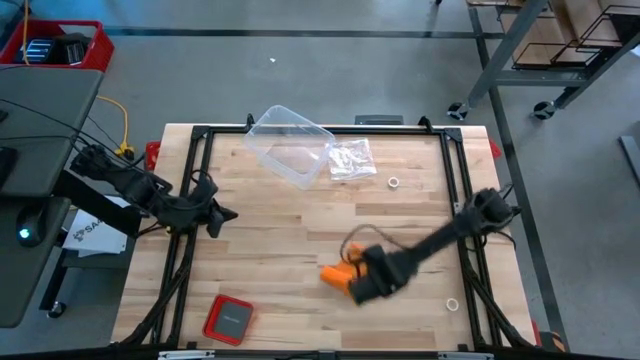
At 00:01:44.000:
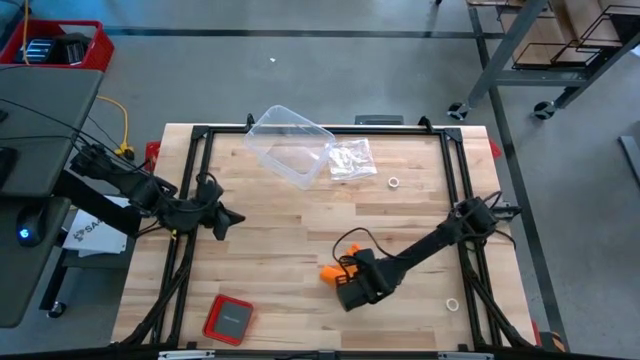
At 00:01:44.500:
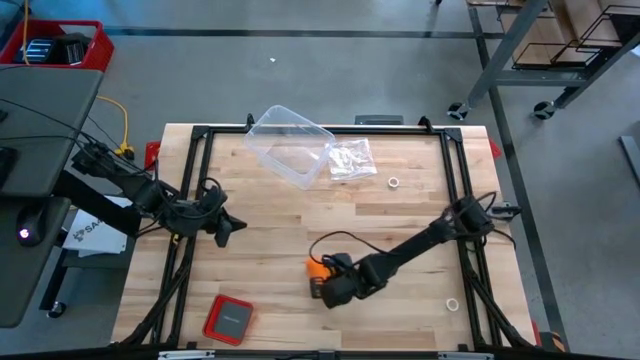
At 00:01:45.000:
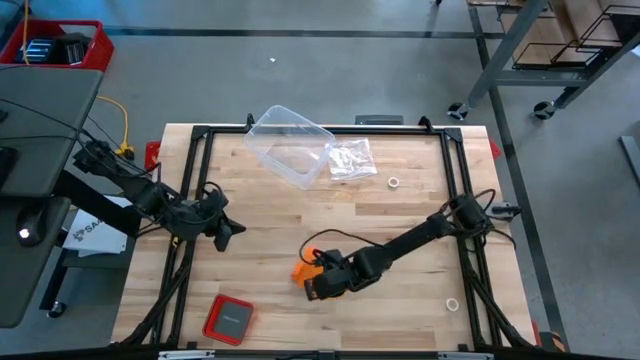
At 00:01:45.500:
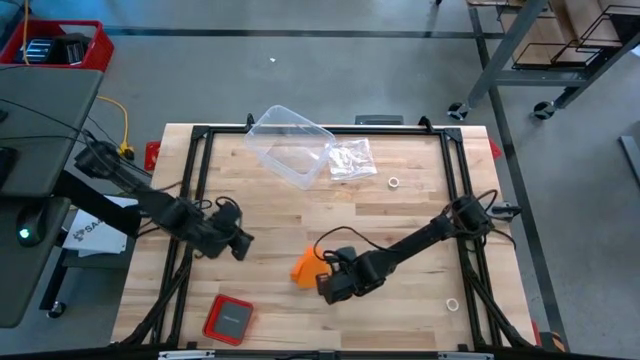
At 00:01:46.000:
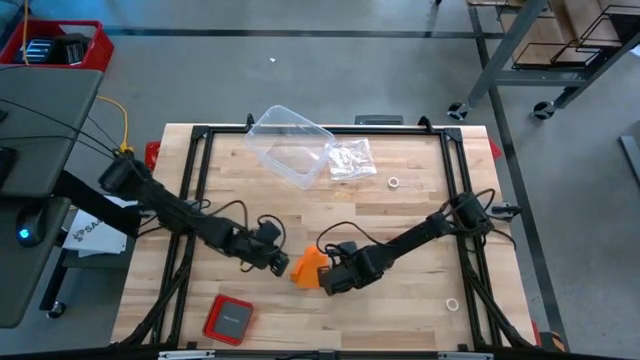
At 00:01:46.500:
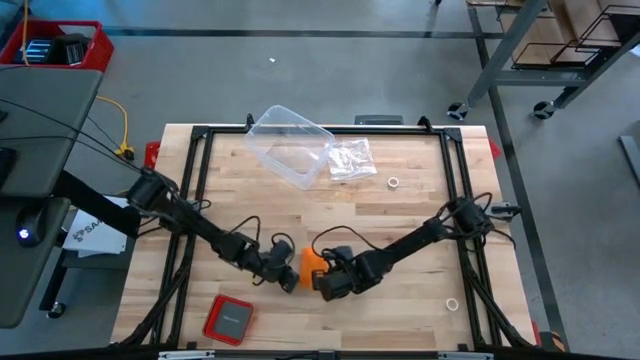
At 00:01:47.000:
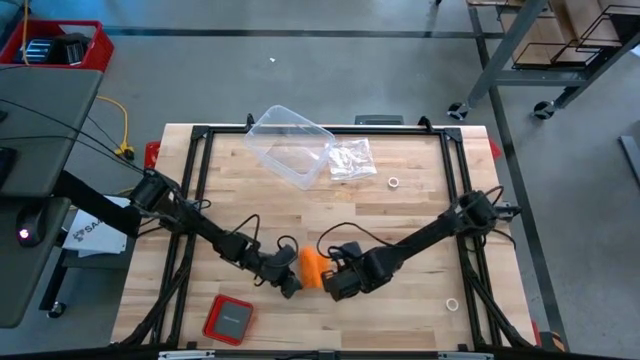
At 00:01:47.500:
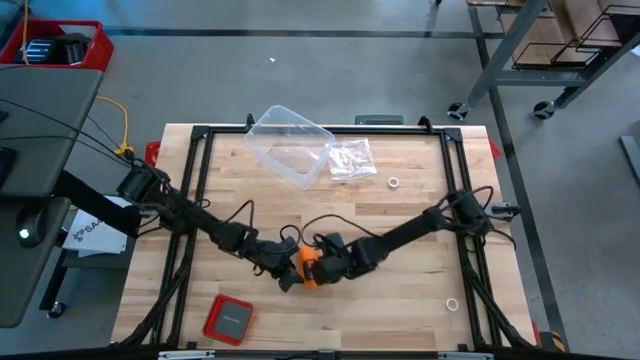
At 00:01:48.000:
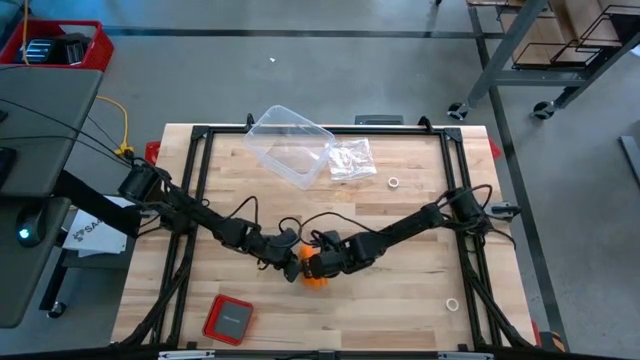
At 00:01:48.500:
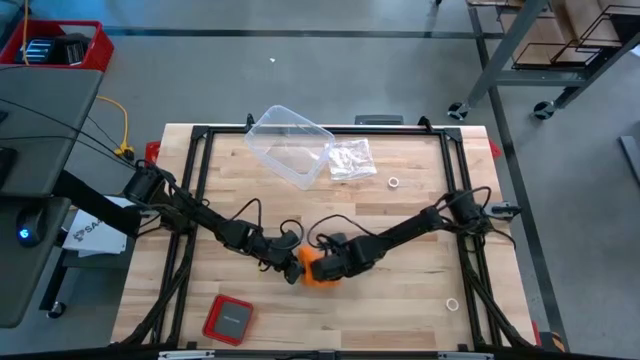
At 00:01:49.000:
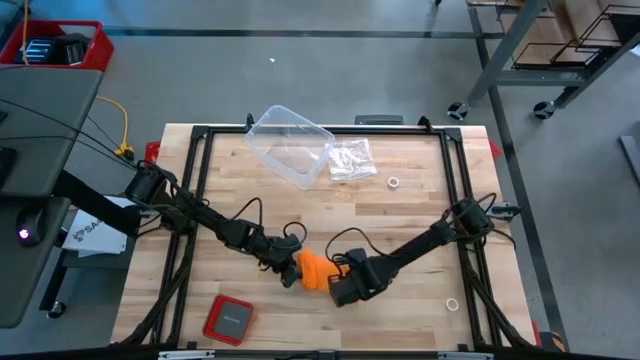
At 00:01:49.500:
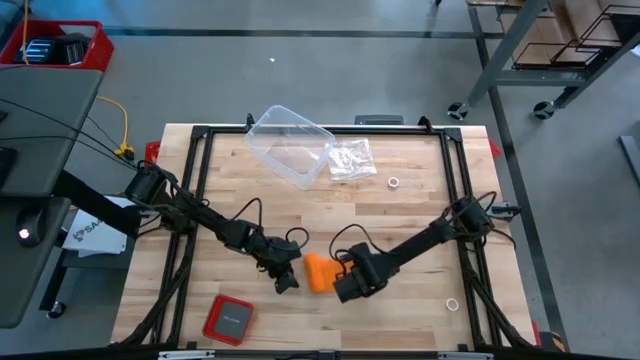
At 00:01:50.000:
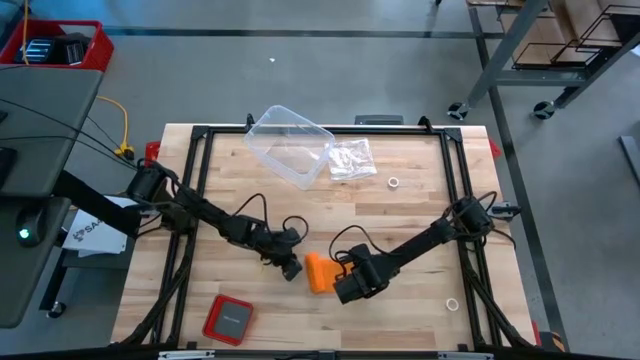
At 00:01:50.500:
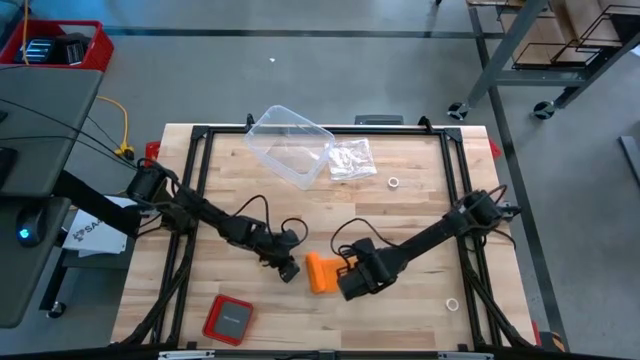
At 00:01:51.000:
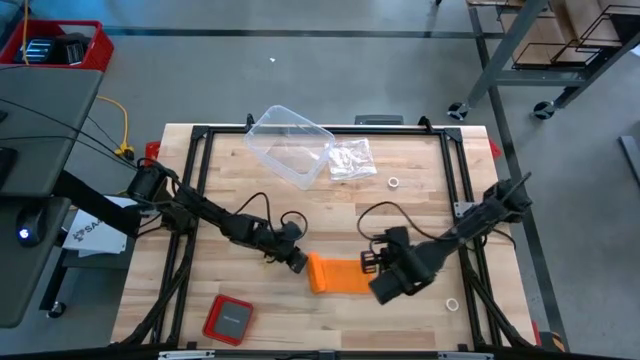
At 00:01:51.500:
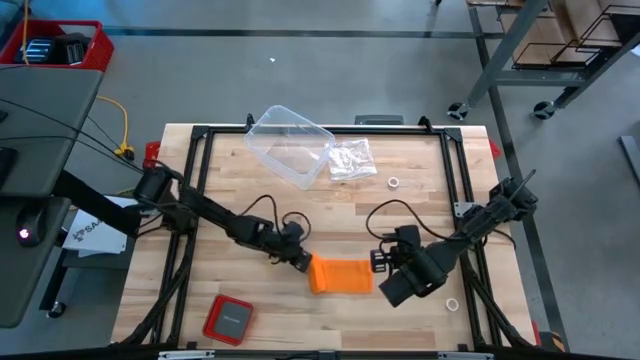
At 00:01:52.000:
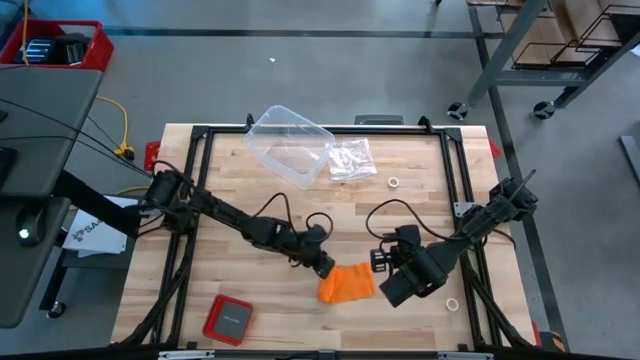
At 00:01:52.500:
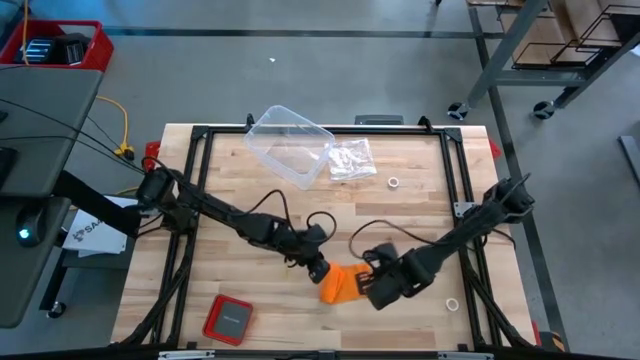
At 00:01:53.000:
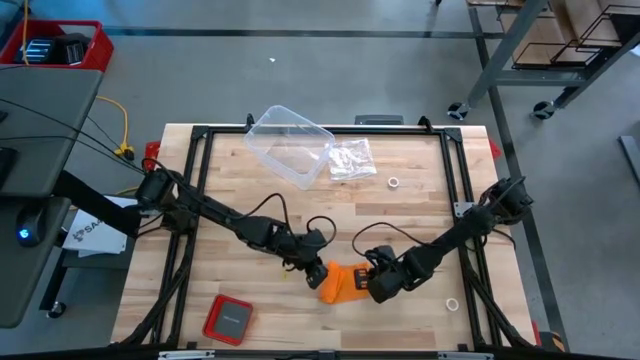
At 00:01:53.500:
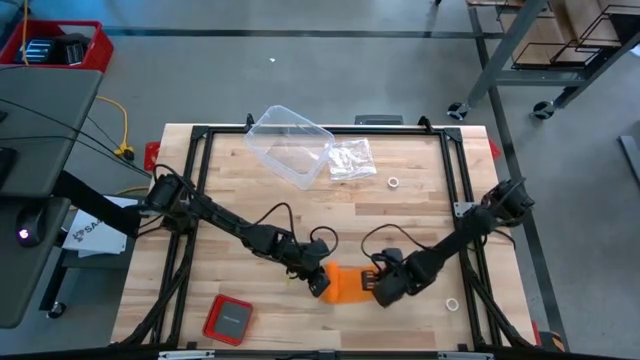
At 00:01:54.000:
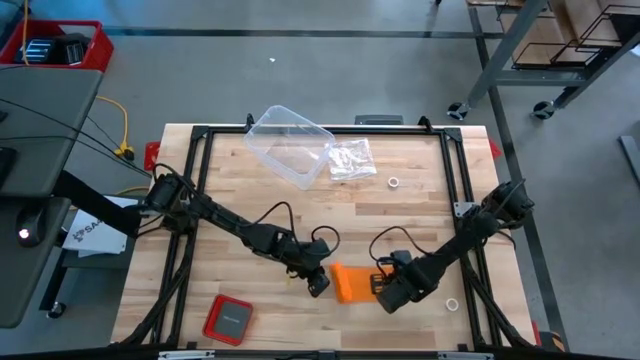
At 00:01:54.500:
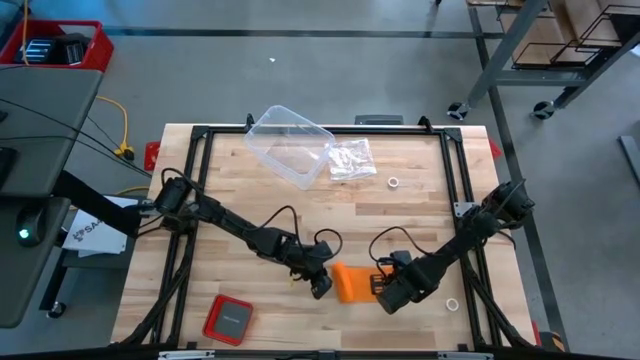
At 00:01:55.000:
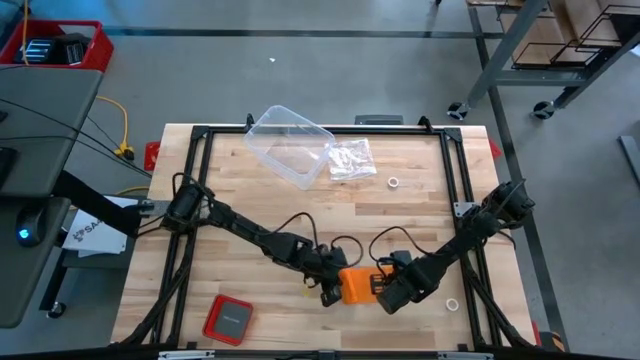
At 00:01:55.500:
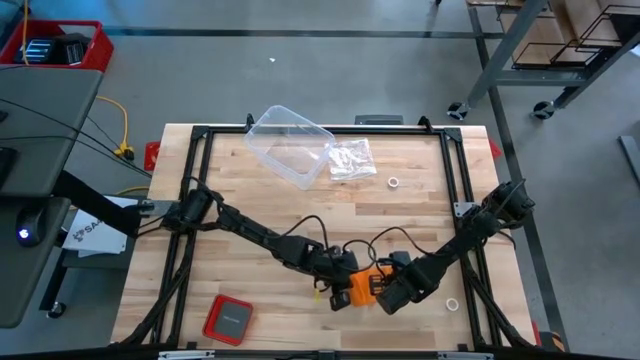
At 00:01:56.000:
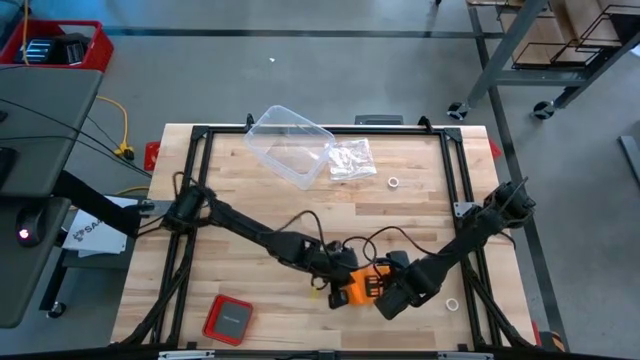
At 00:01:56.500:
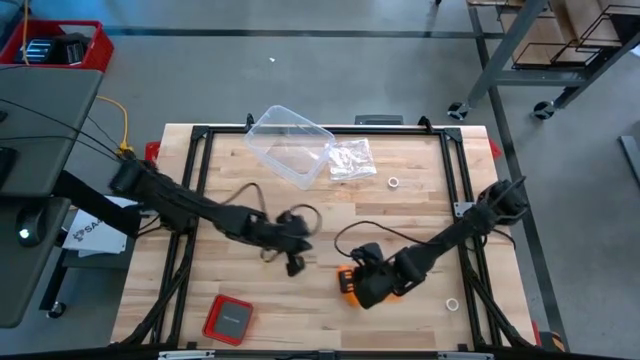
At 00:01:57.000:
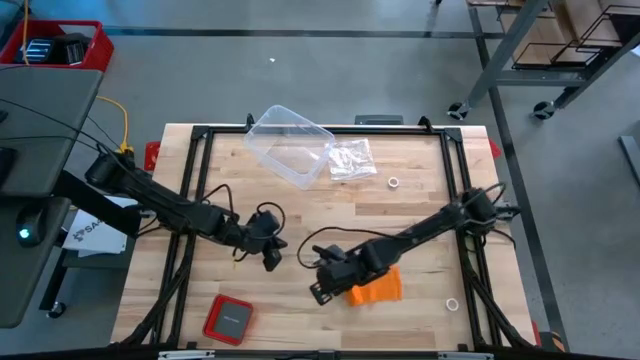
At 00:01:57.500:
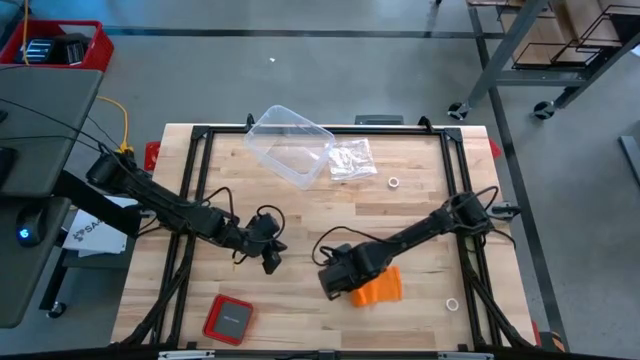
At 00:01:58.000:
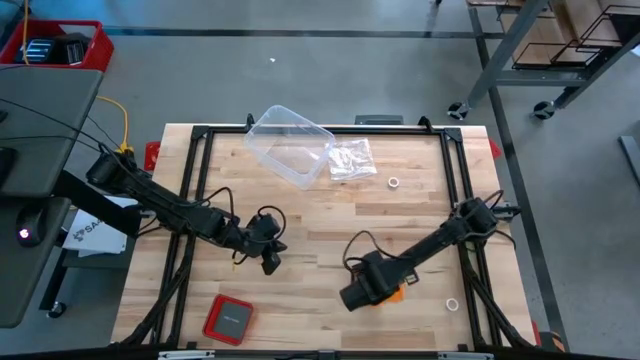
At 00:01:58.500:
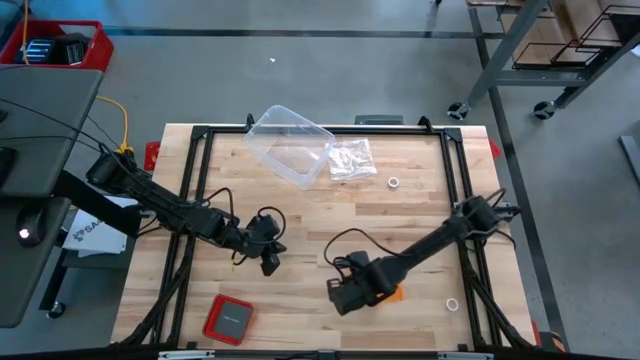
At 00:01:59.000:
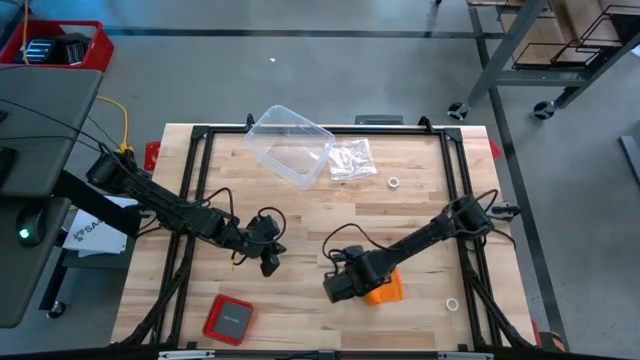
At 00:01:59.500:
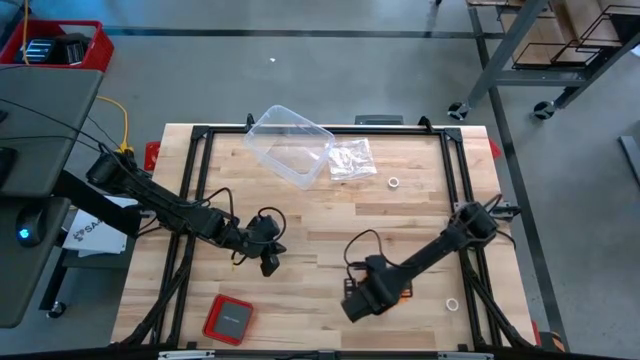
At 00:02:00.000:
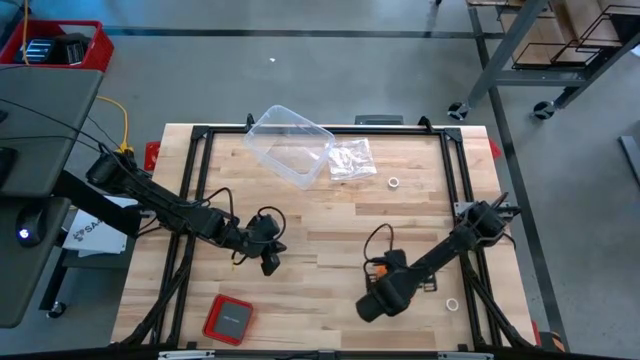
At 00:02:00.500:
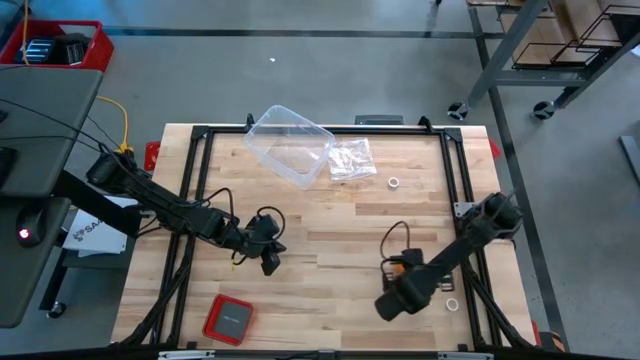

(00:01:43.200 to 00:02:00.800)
Task: Roll bandage
Roll the orange bandage

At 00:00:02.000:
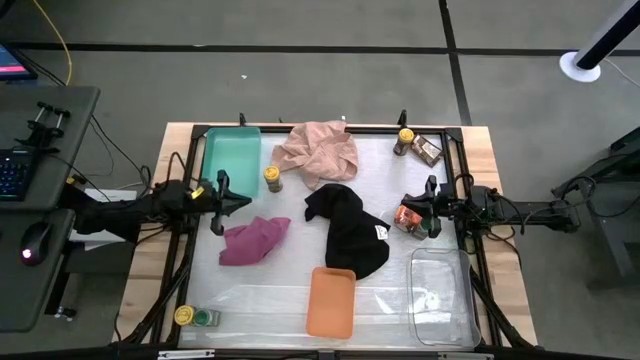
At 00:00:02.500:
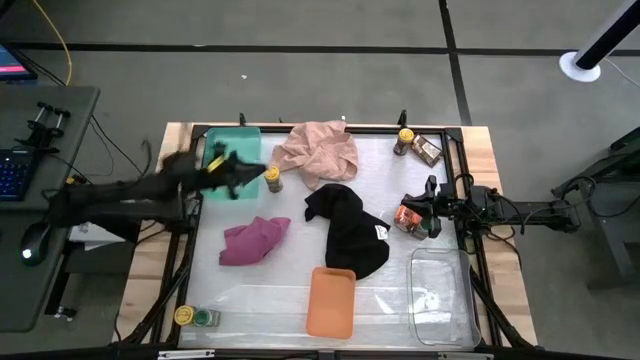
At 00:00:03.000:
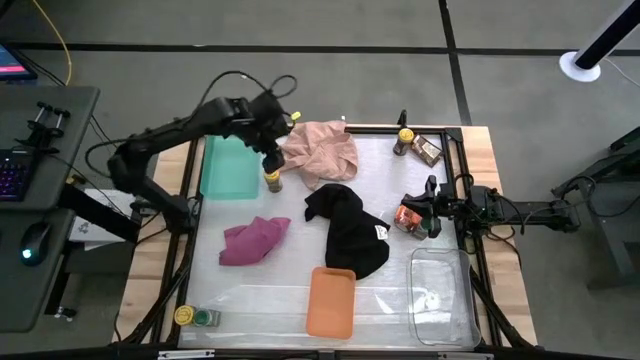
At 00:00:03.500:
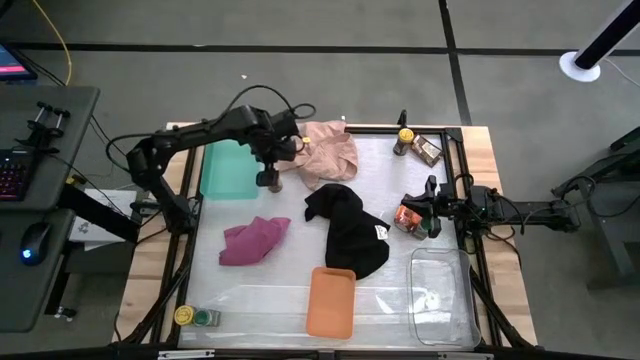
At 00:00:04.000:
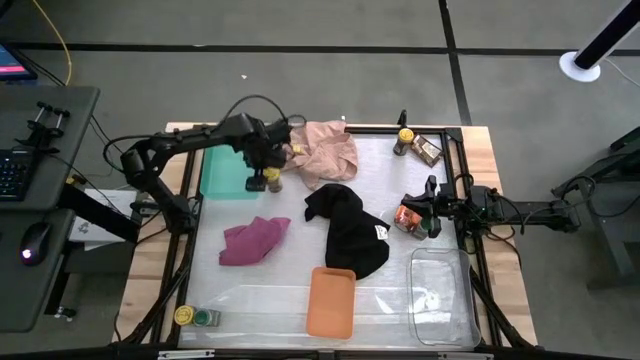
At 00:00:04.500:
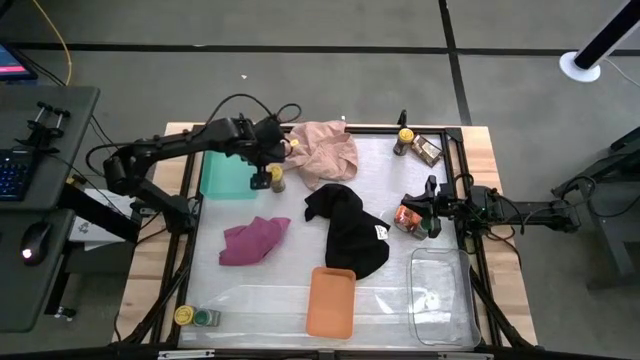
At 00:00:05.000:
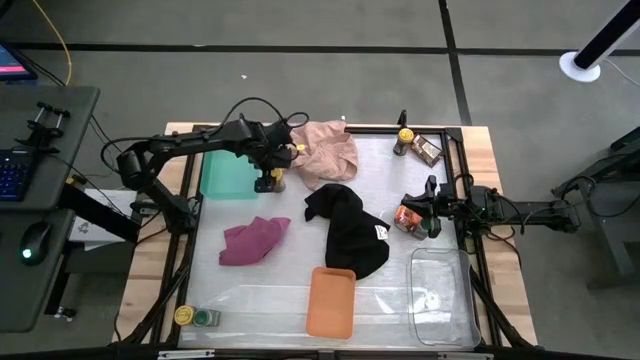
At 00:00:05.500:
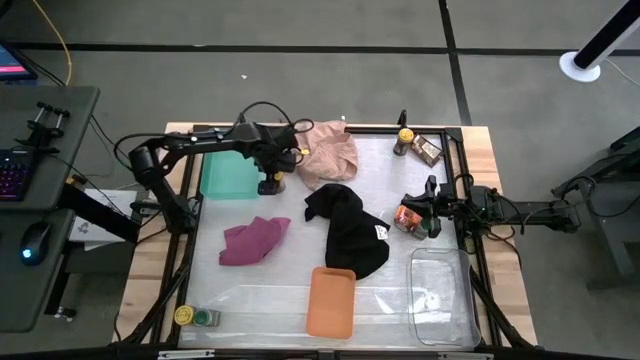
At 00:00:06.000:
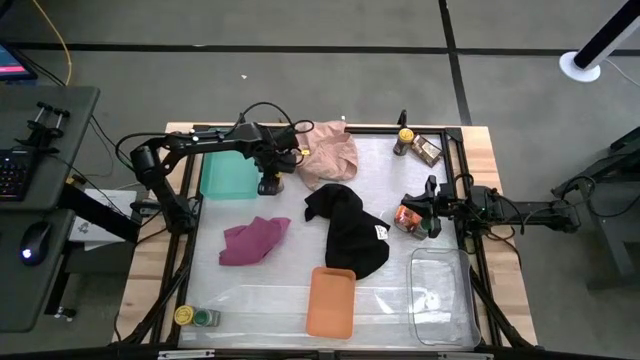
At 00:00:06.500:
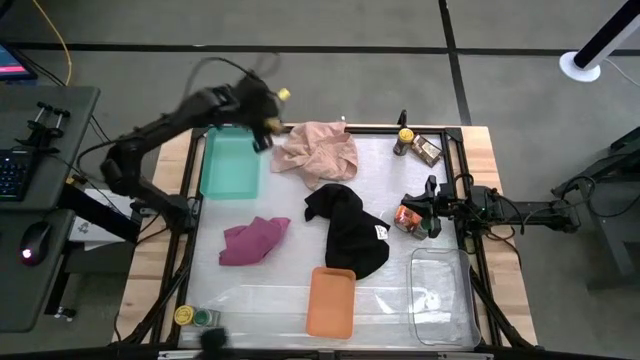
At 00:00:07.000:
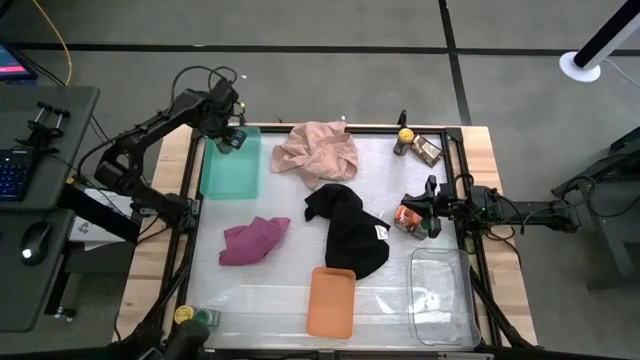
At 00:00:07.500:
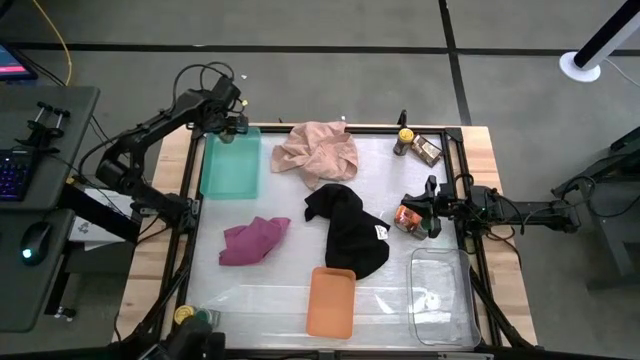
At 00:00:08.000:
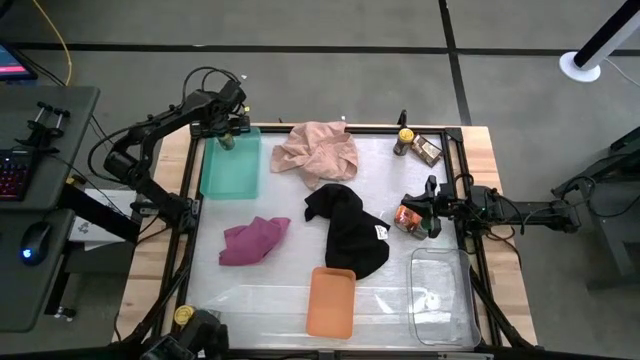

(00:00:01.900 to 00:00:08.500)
Task: Sort spices by type
Put the top left yellow seasoning bottle into the green bin
